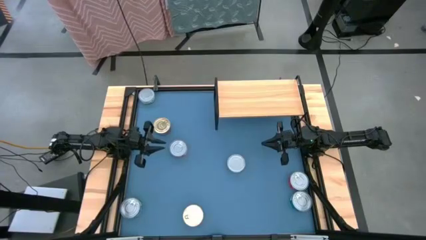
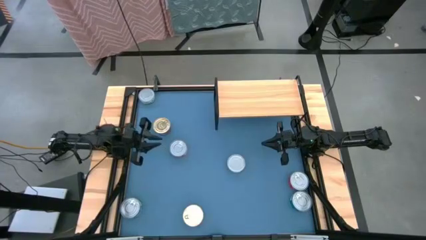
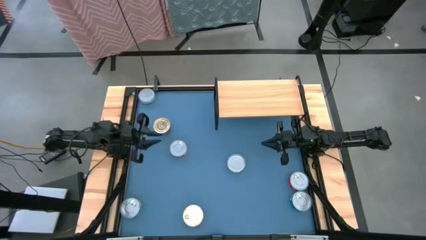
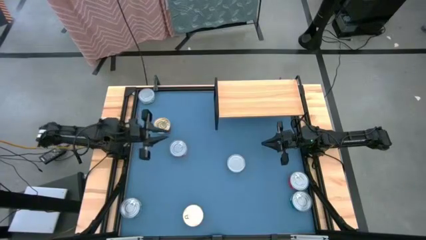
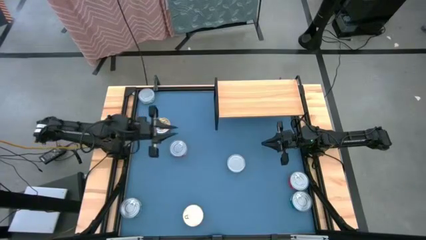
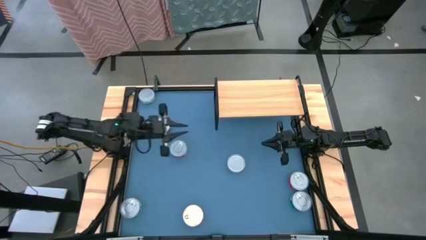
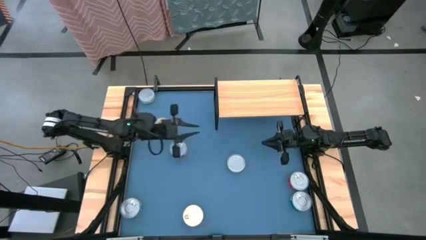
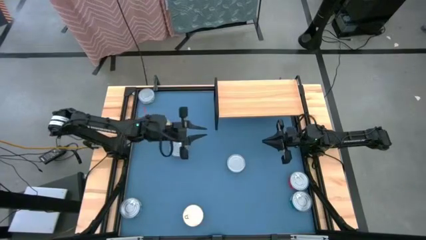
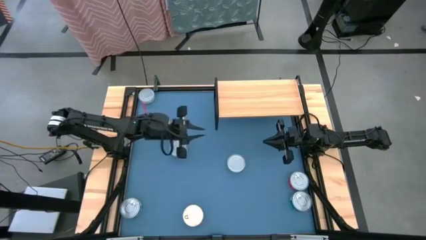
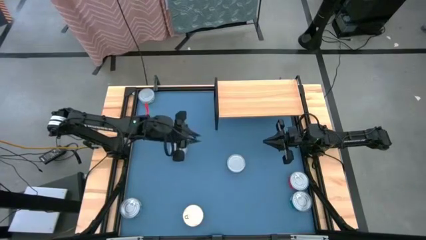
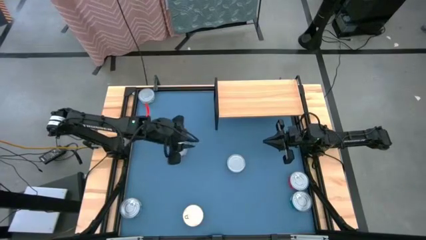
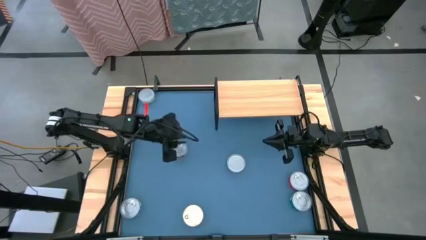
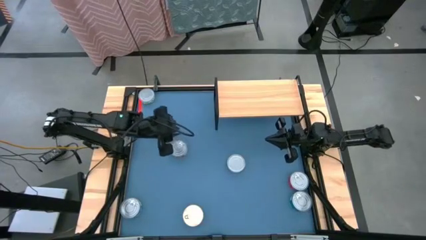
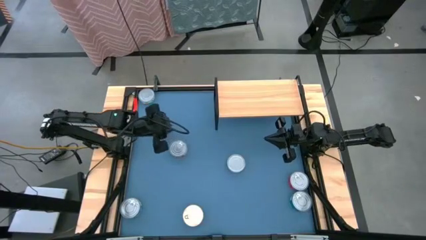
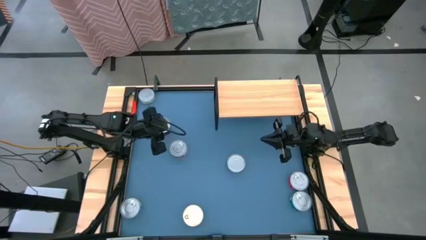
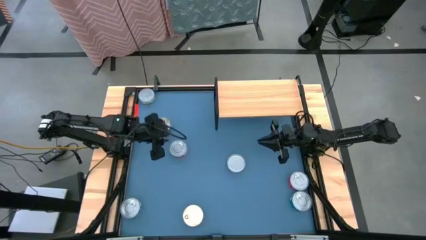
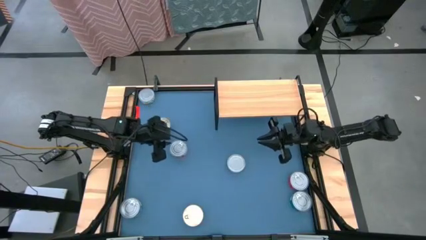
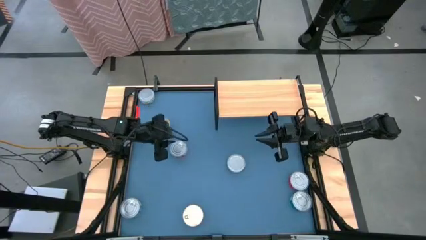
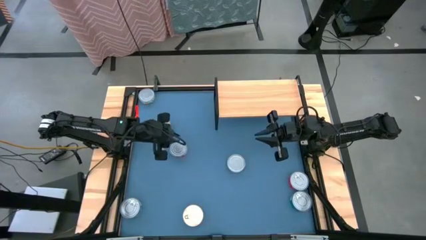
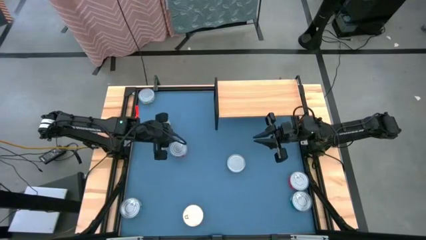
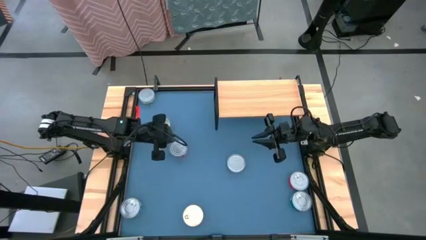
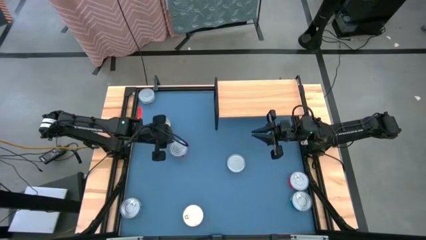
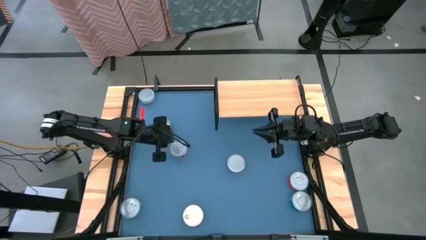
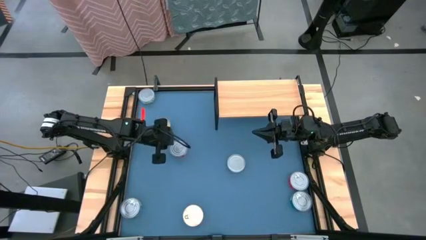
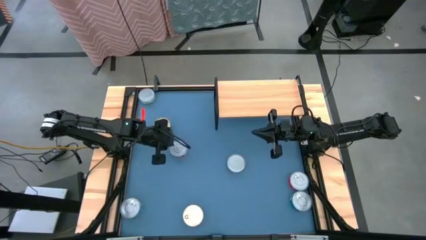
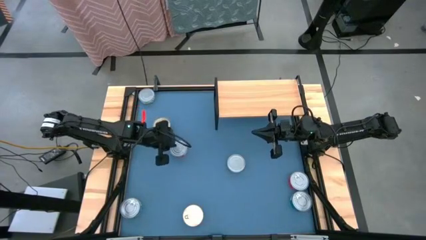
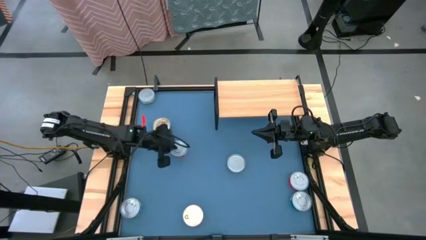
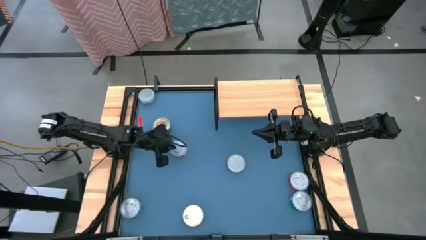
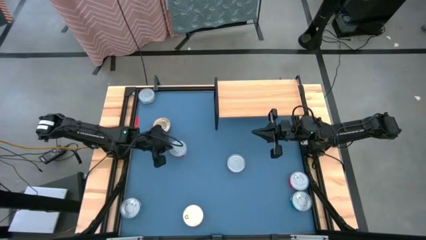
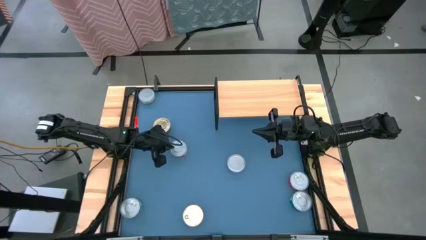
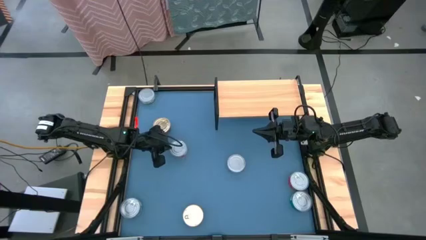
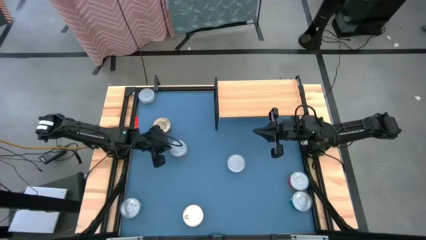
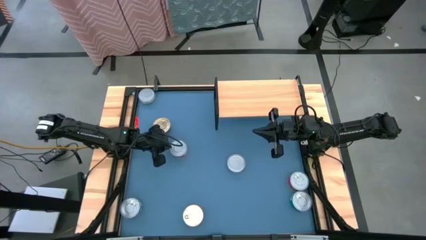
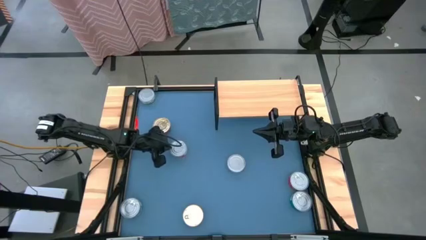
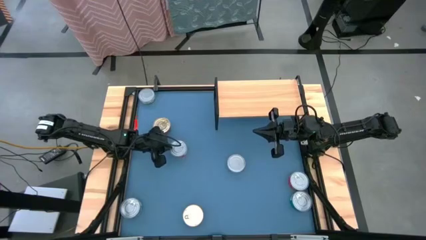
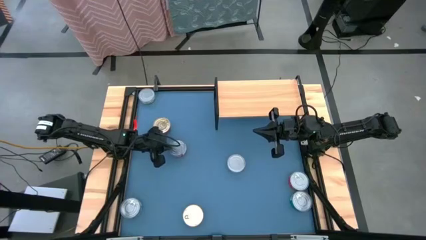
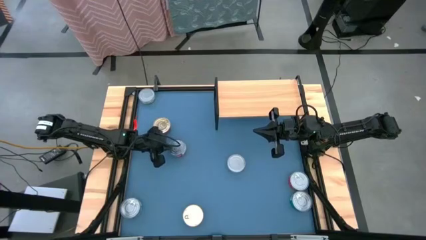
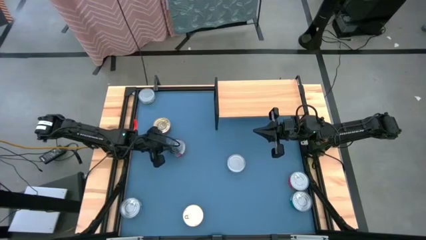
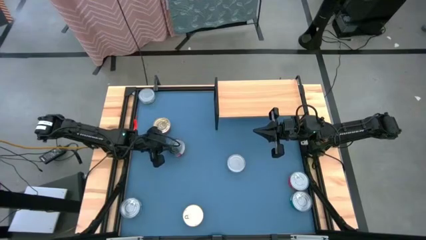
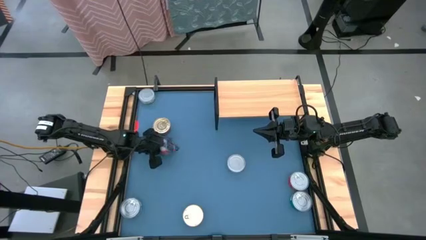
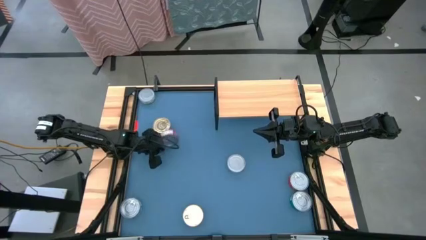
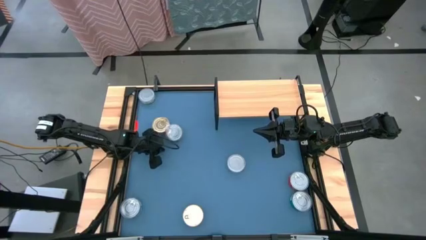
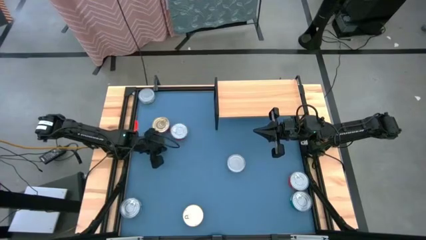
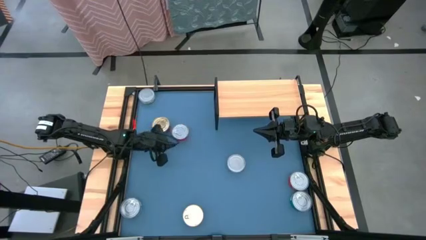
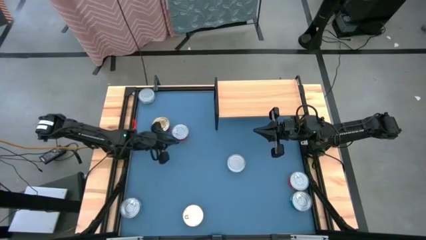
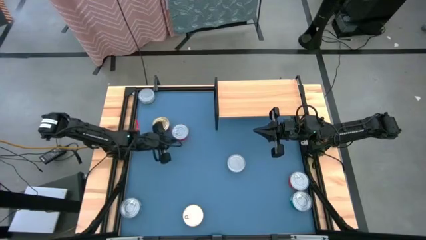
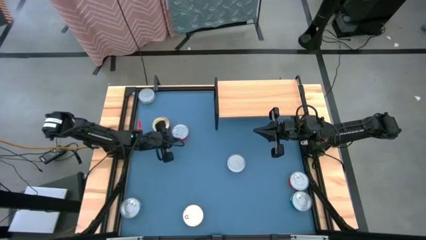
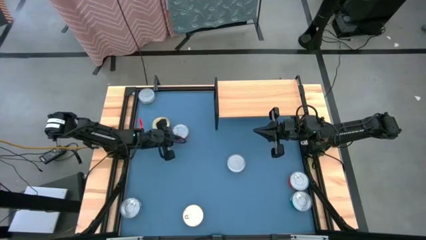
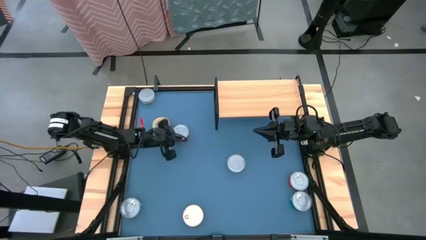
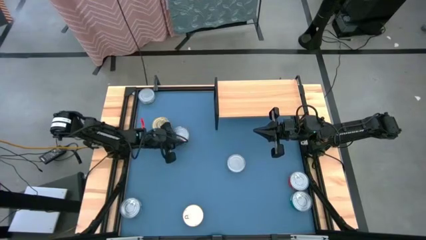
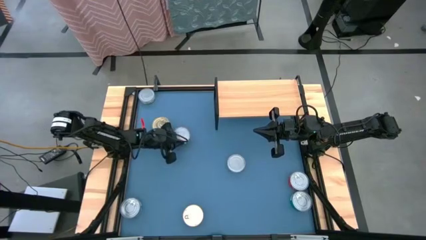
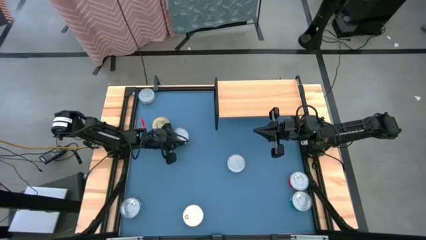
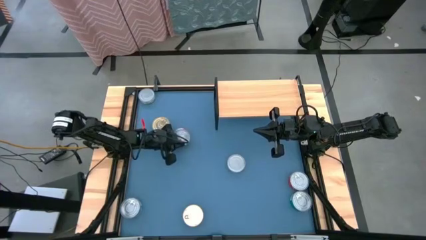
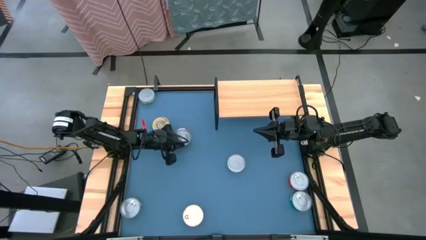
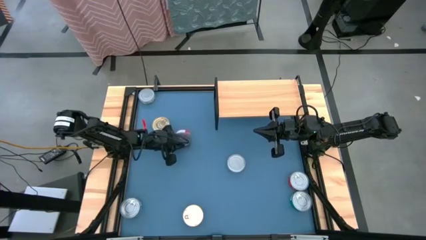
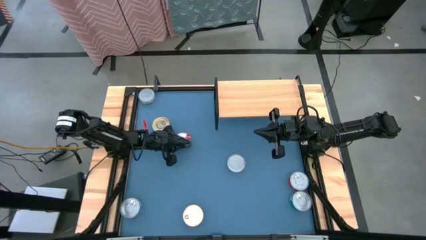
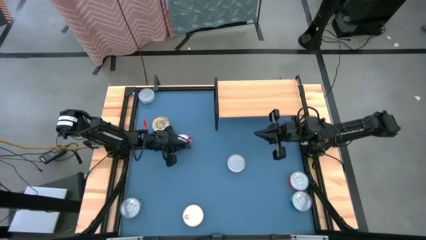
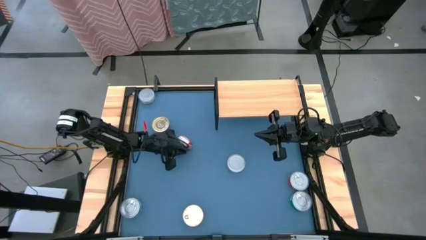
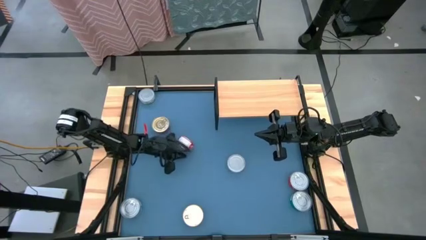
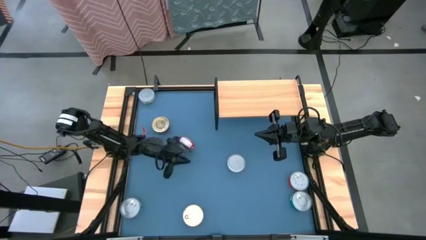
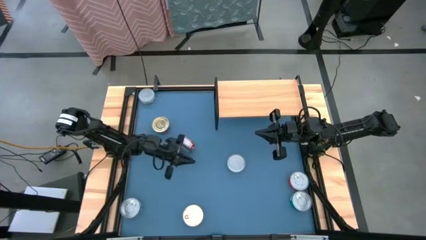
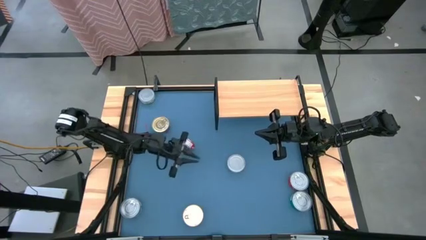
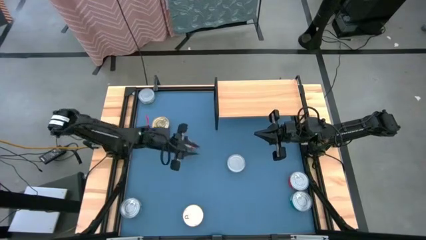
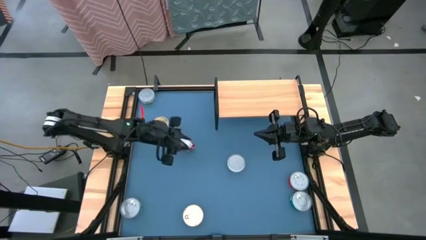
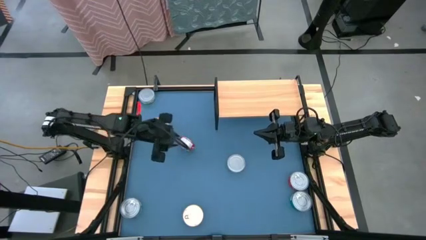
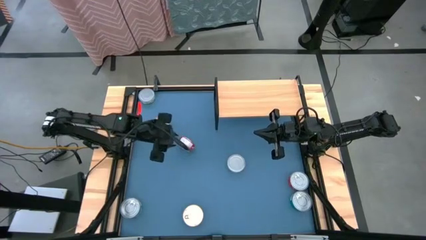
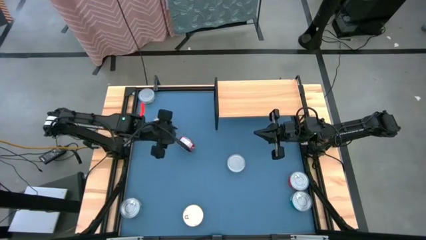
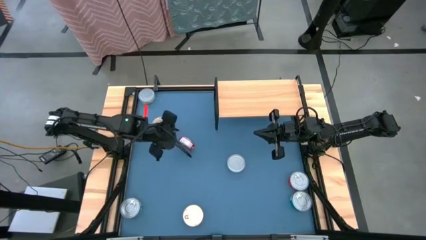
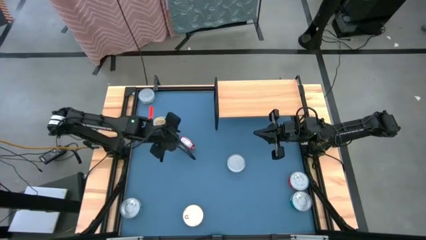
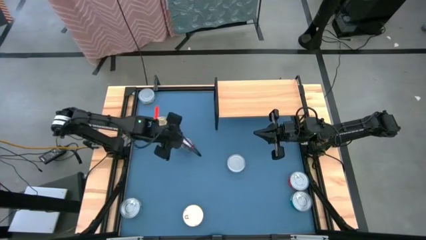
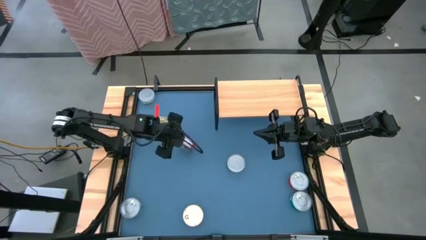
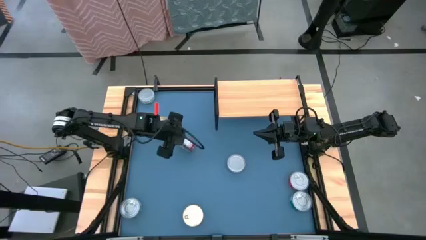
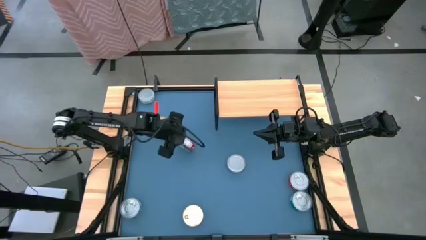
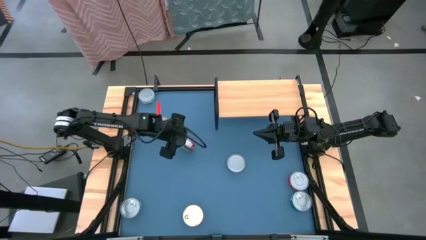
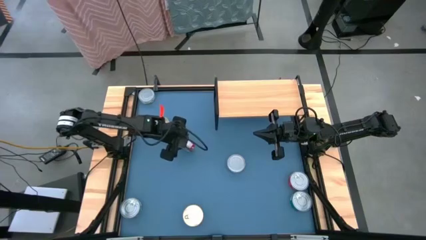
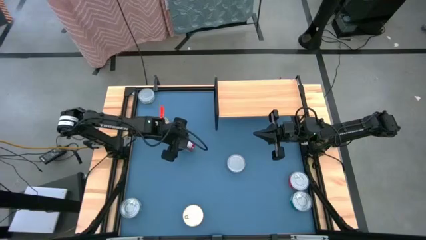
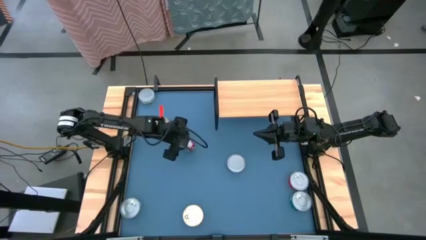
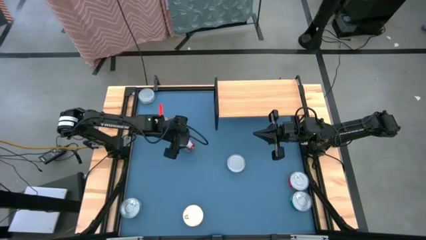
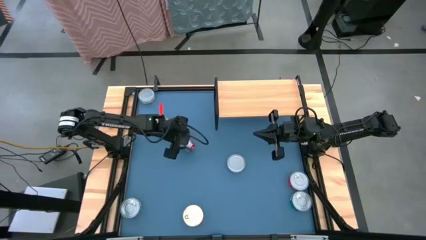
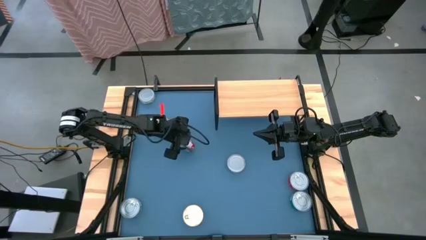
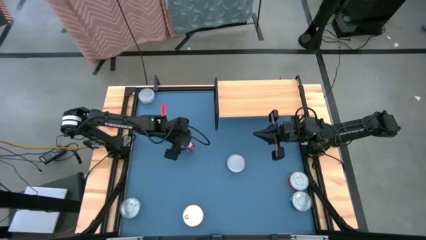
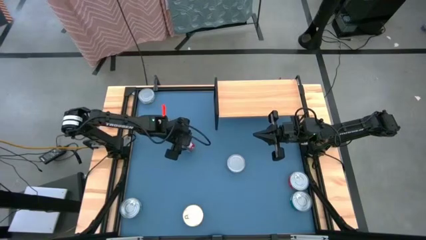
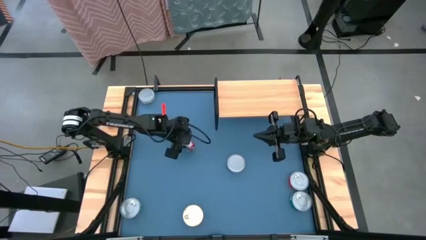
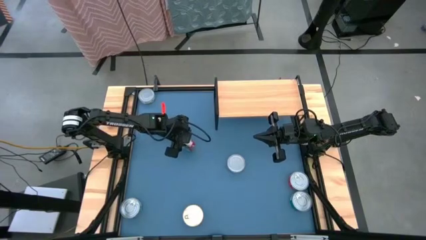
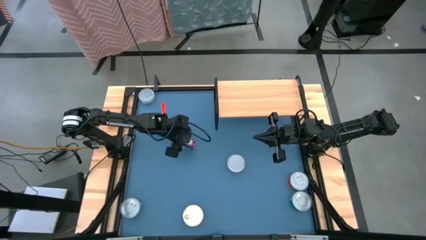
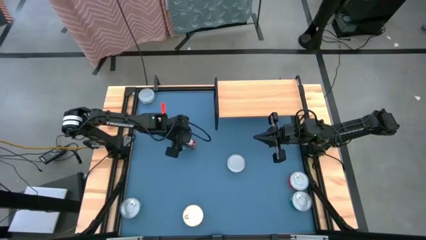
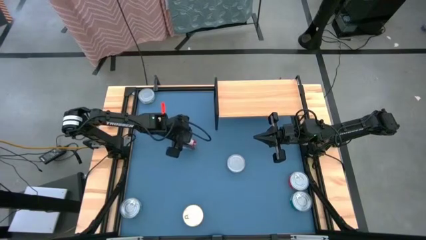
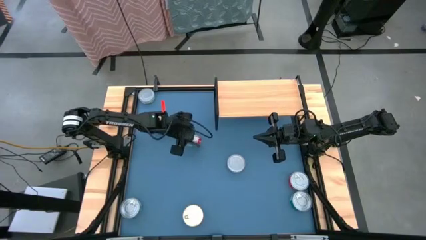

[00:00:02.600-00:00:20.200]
Task: Stack canned seafood by type on shelf
Put the left red tuna can on the shelf
